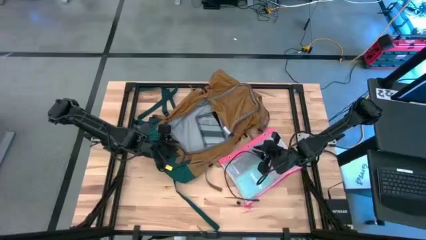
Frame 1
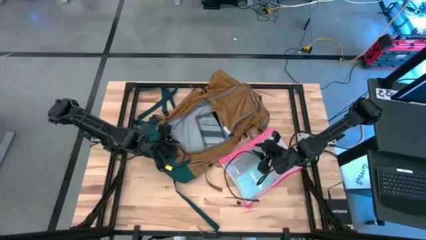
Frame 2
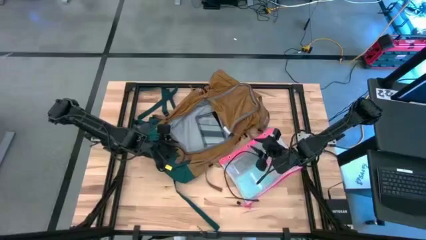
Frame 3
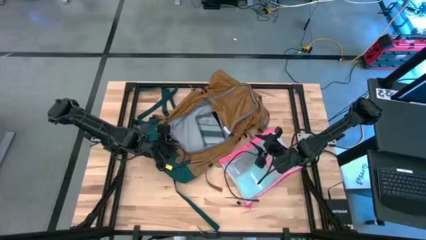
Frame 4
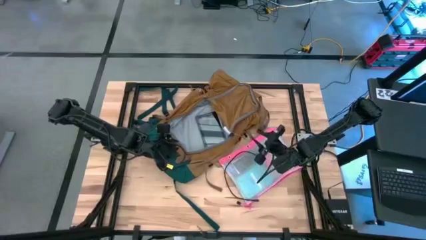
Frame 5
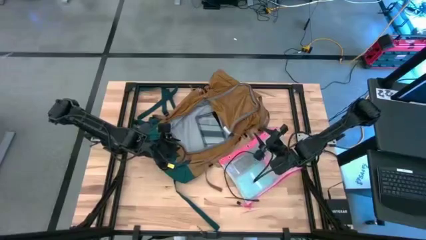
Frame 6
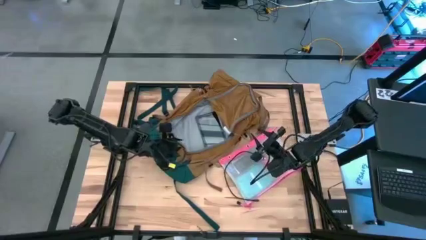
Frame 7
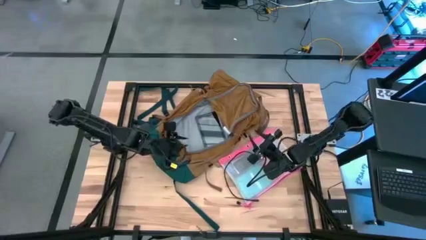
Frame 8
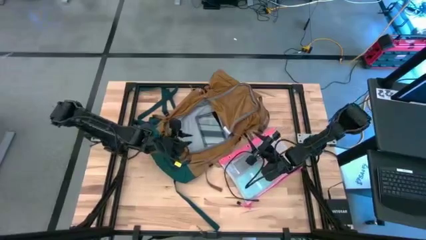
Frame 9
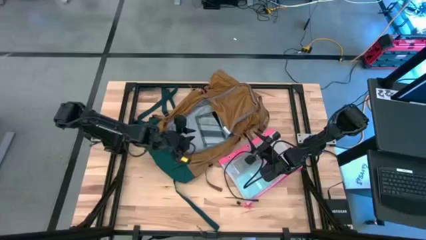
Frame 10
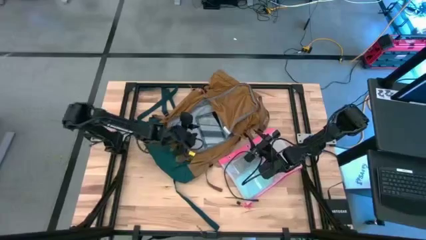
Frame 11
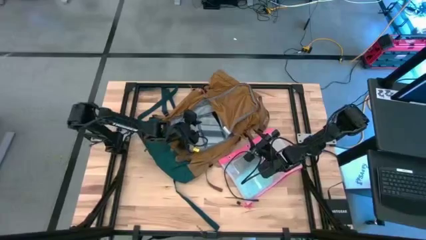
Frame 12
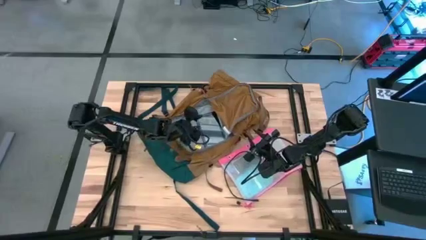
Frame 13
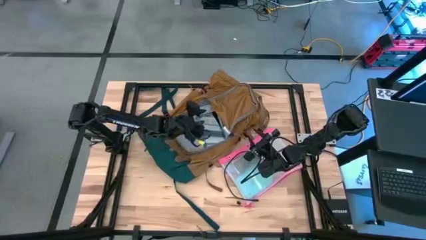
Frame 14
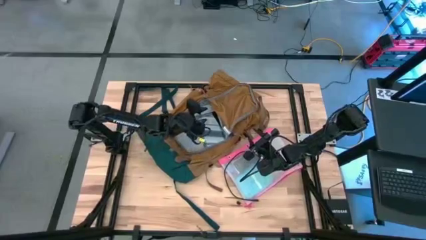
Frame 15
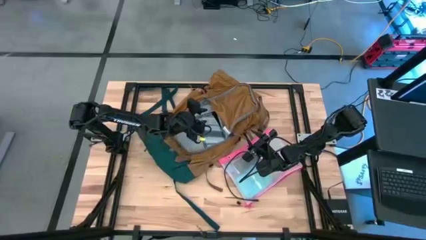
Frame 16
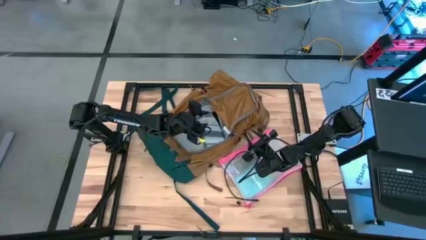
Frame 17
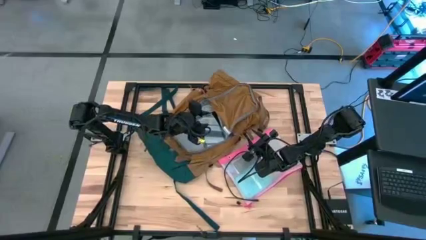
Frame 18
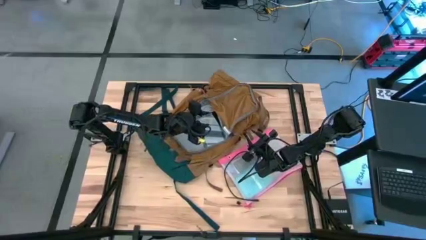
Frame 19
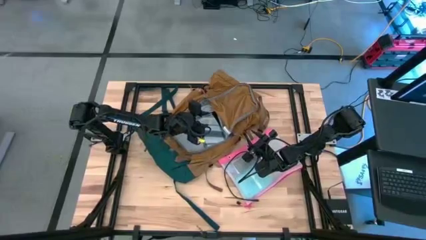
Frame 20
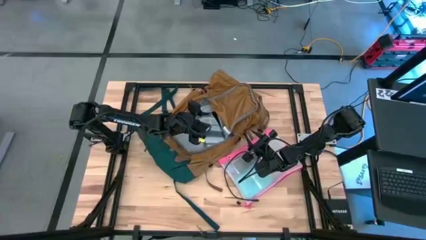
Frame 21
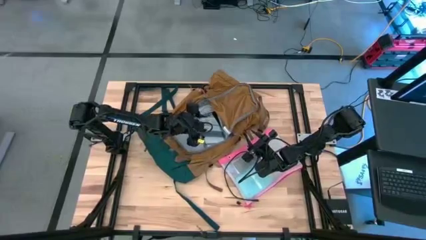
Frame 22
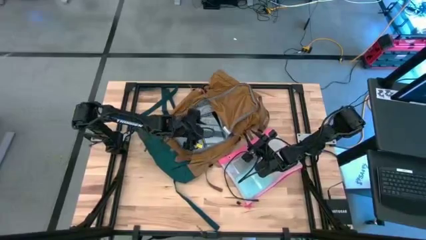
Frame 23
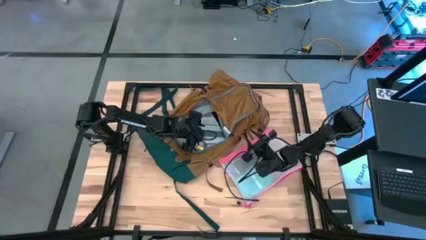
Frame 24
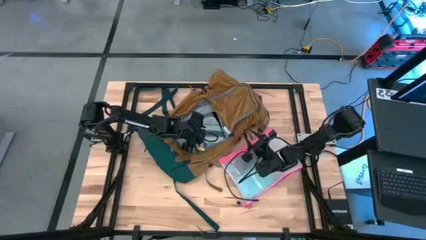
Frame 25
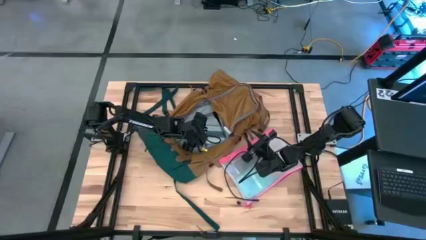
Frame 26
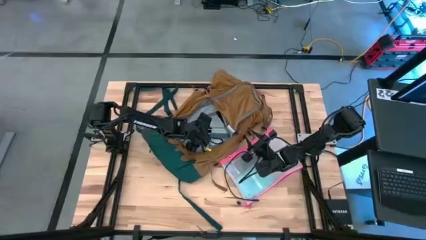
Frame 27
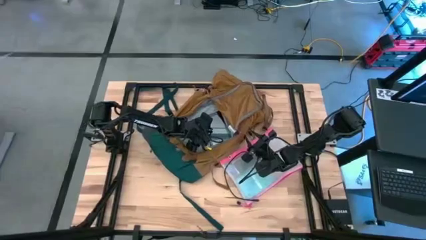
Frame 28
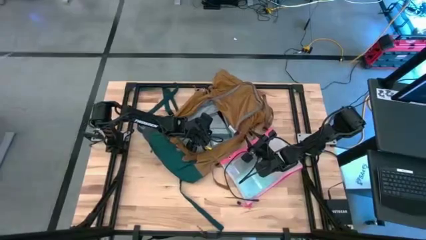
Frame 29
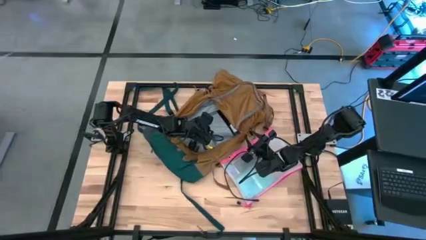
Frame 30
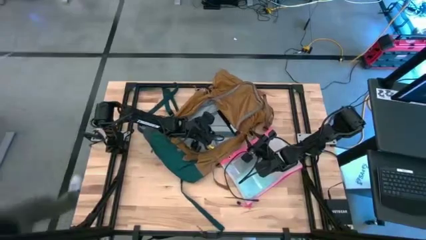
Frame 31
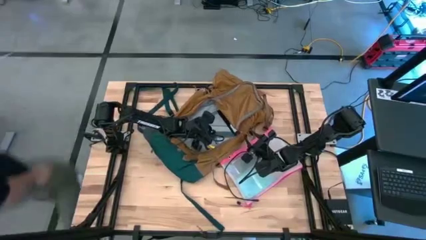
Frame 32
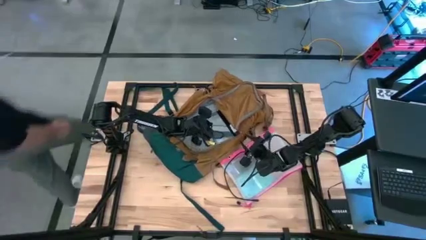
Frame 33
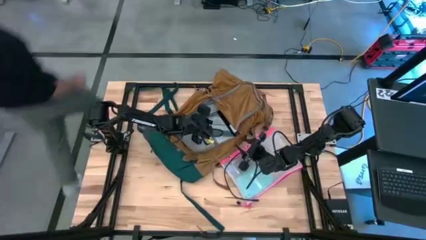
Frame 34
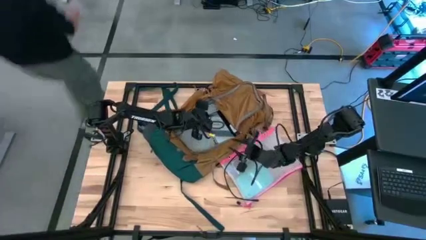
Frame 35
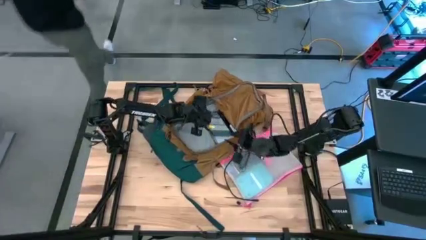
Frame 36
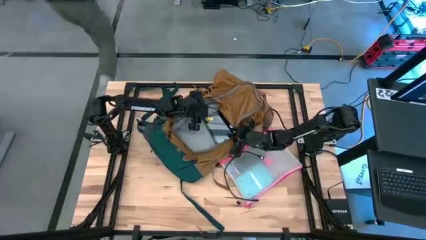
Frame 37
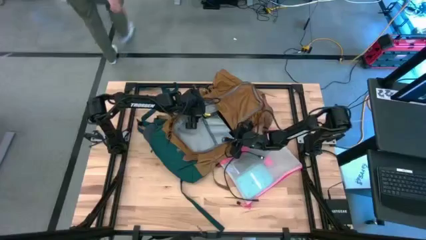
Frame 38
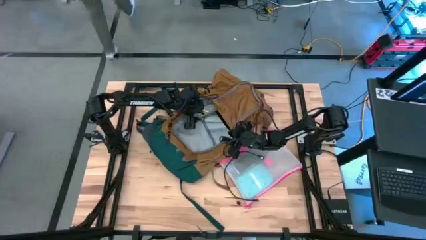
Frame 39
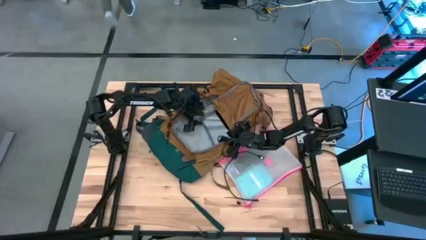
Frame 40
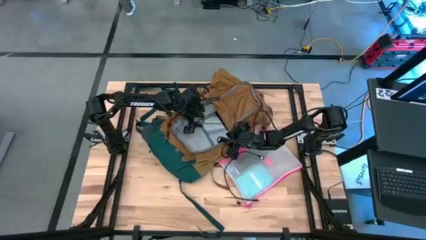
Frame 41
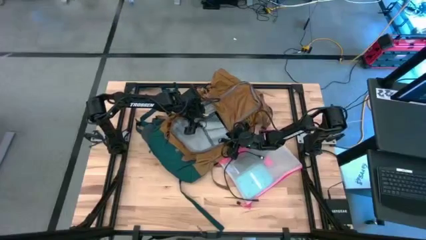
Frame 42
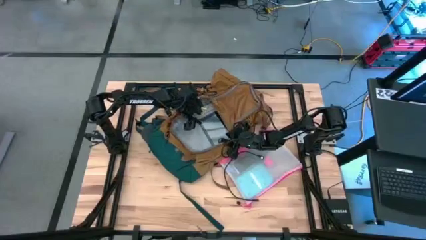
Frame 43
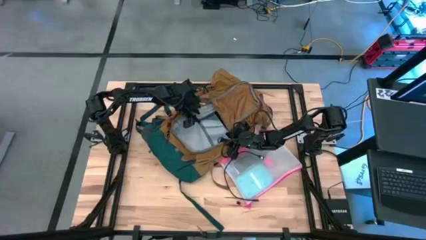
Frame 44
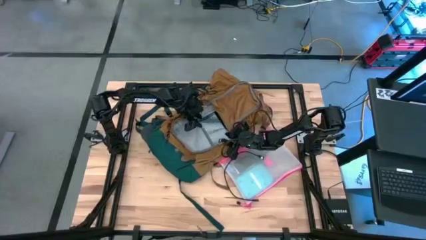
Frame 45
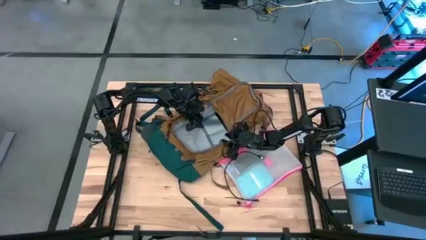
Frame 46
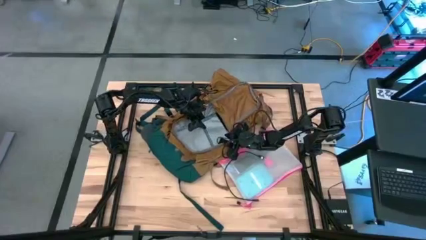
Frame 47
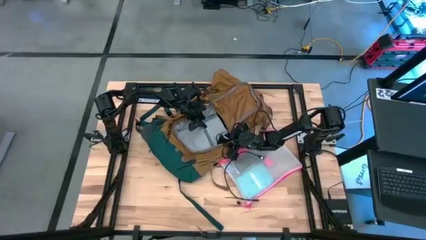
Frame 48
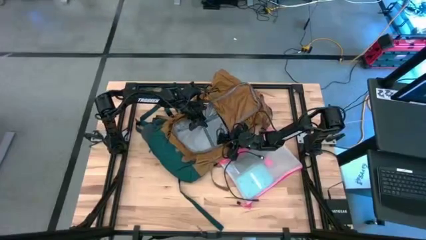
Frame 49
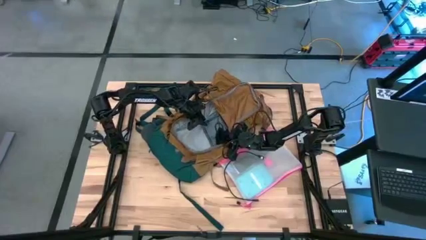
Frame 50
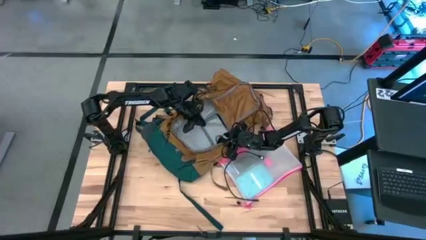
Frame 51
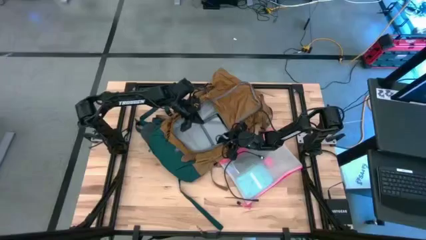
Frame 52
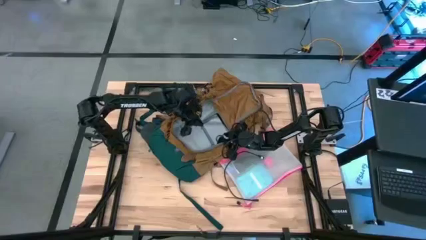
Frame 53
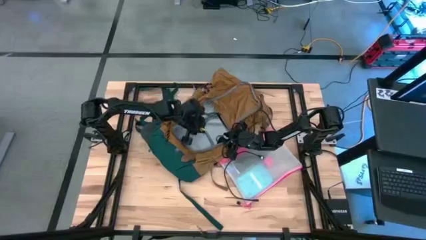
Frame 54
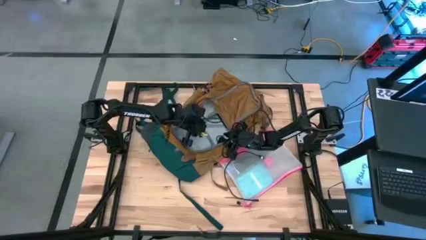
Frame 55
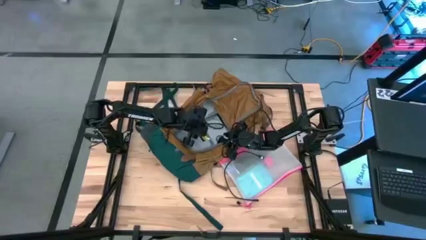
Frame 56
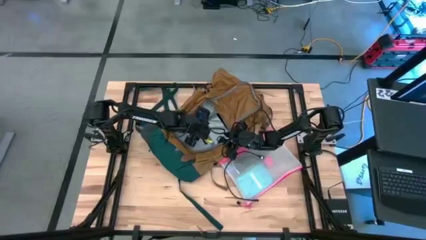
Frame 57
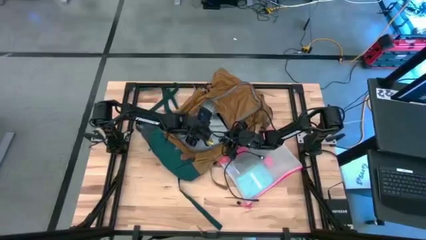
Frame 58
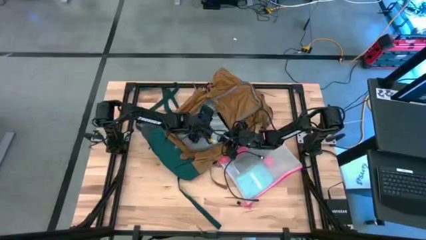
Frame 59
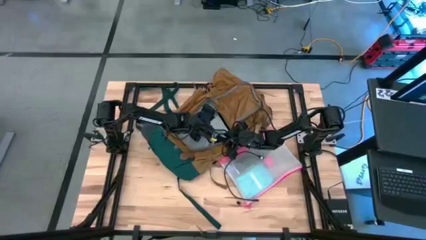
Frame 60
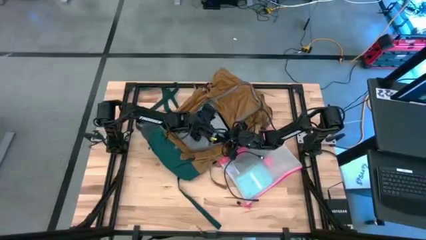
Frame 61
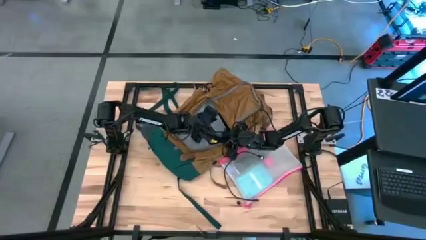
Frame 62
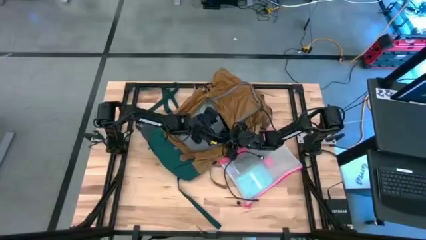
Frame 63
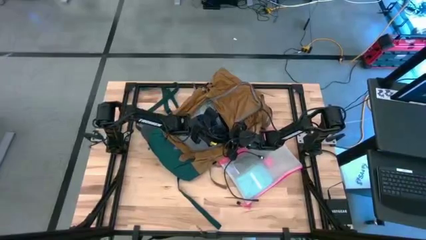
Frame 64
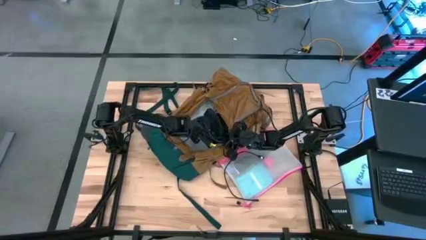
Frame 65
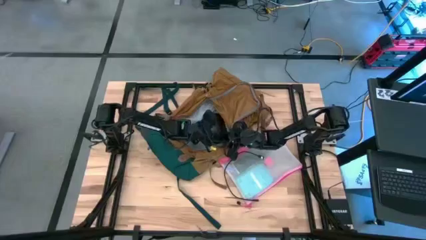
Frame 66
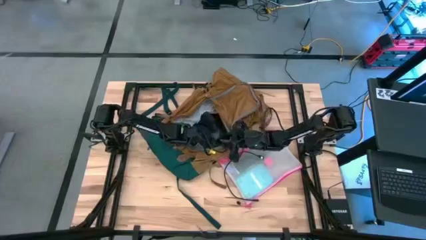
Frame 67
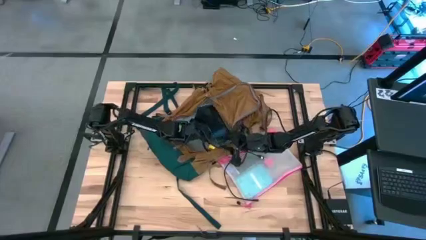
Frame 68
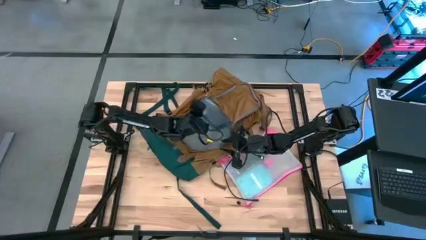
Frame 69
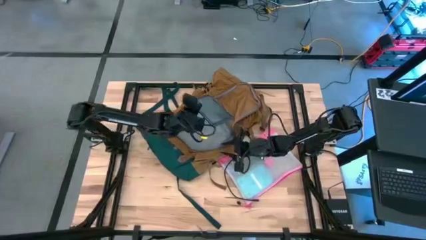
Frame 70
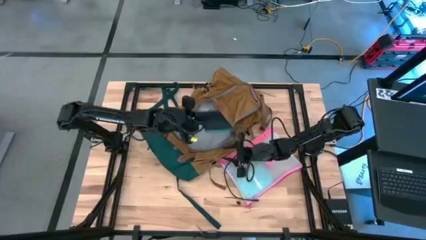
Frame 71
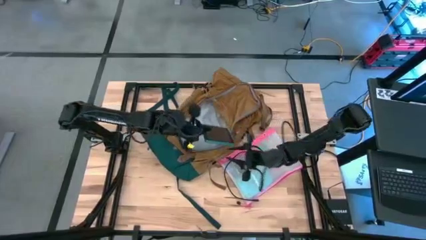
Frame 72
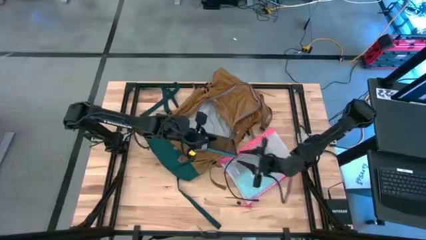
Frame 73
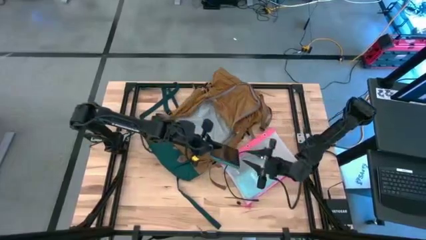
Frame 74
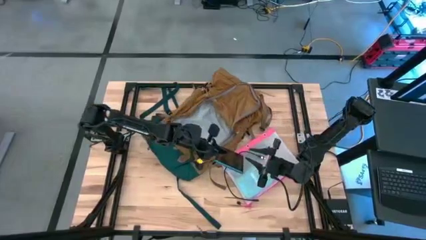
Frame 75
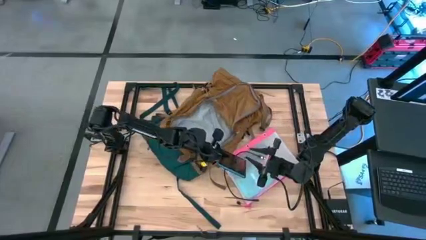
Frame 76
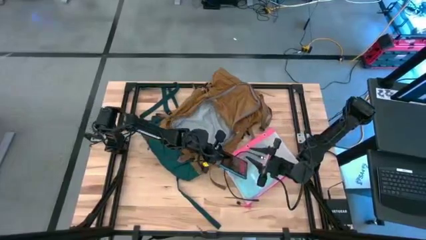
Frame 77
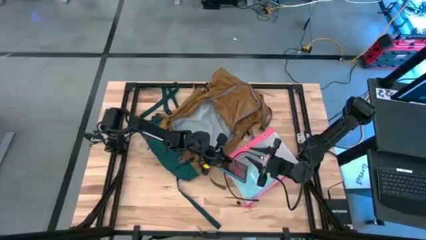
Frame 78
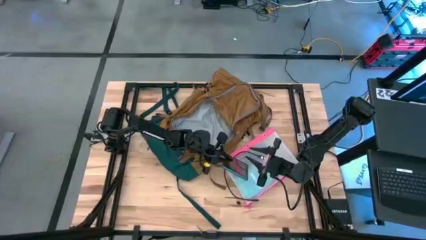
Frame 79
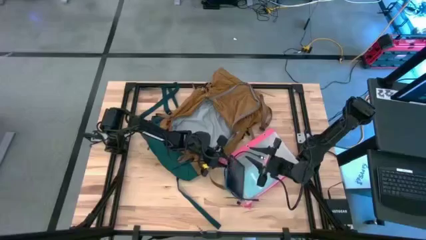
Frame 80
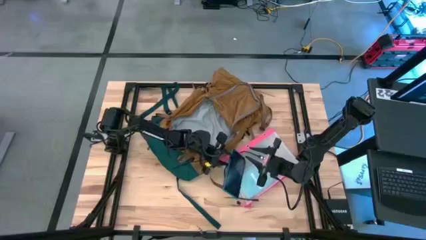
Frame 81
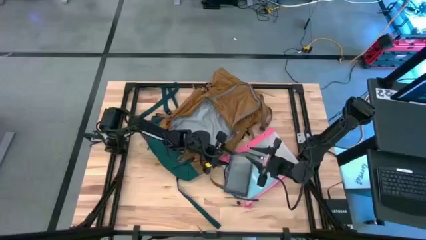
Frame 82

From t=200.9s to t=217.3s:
Task: Unpack backpack
Remove the blue tablet from the brown backpack
